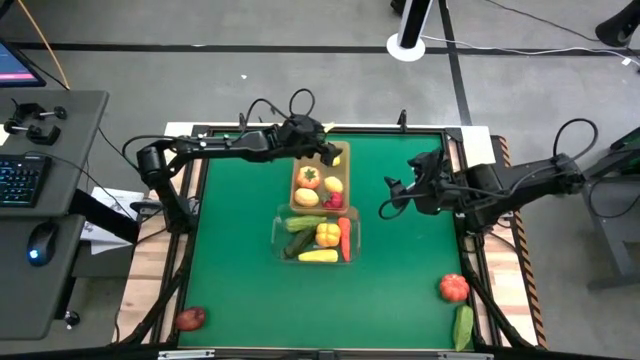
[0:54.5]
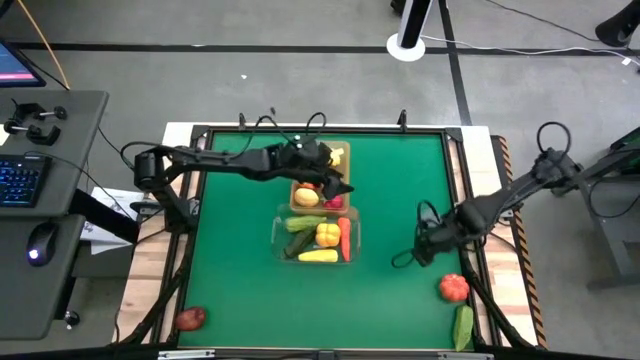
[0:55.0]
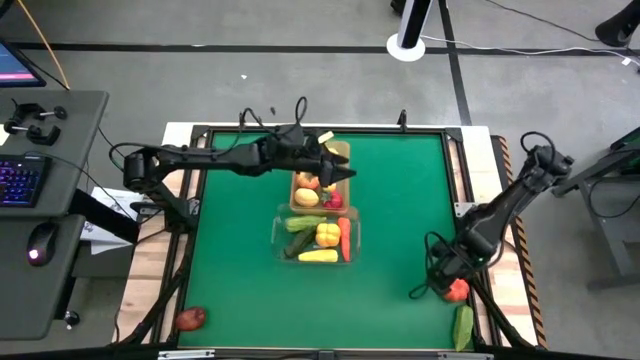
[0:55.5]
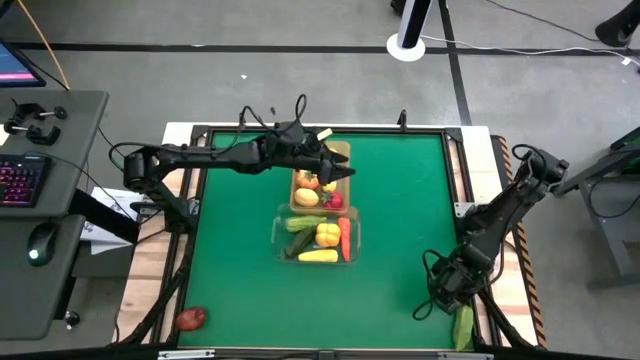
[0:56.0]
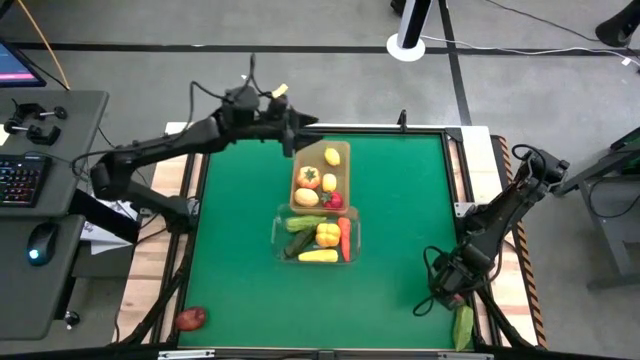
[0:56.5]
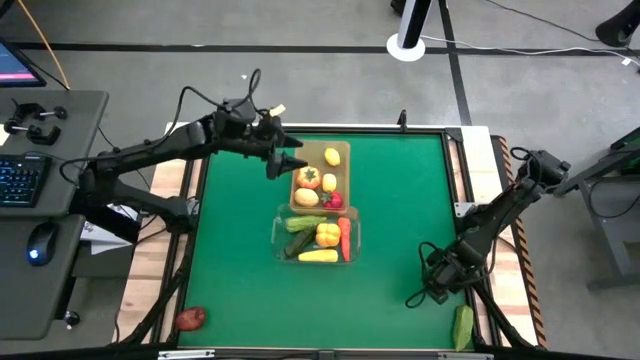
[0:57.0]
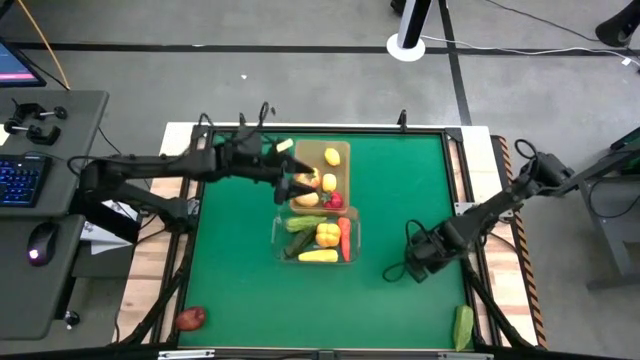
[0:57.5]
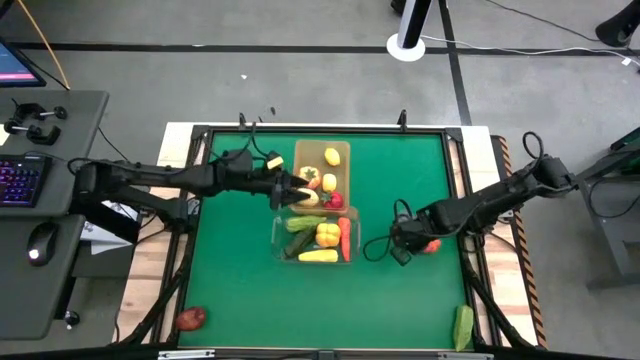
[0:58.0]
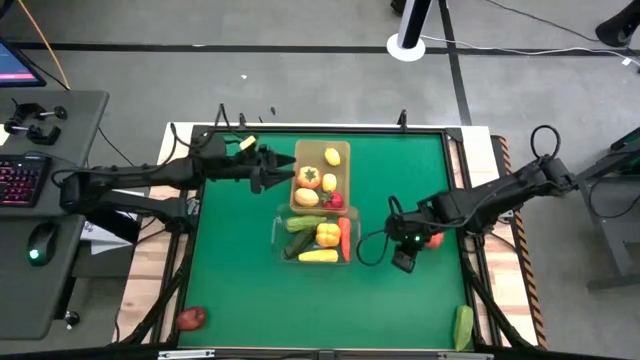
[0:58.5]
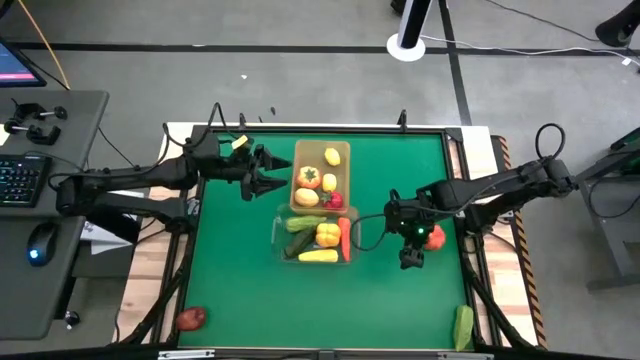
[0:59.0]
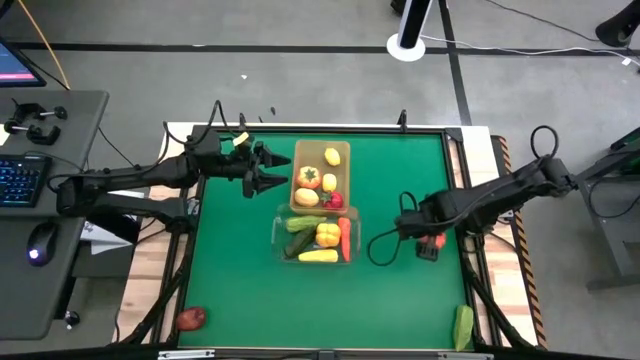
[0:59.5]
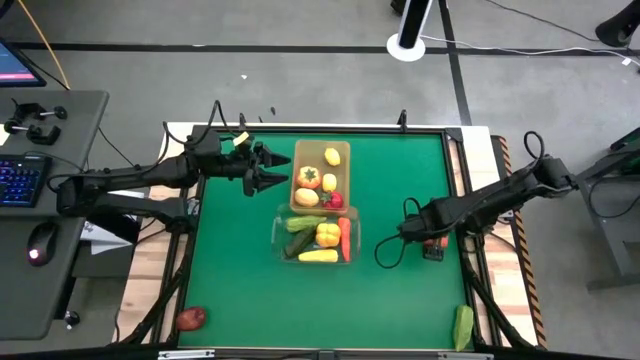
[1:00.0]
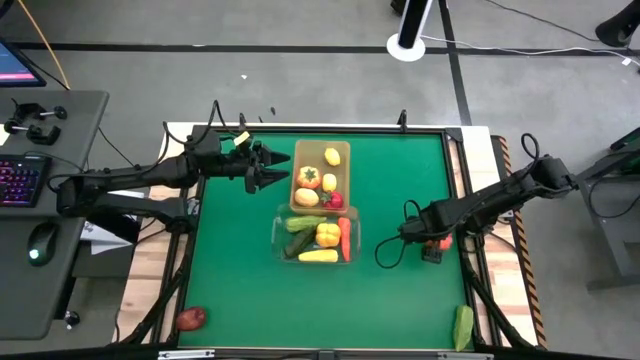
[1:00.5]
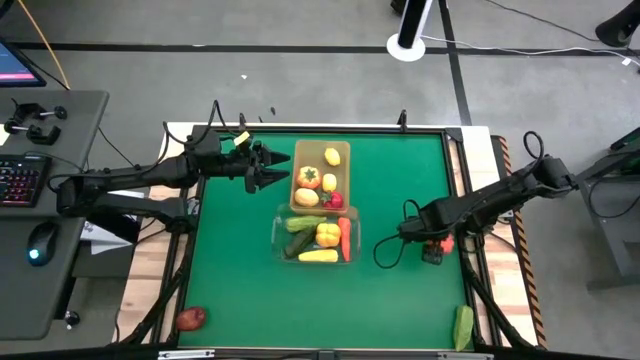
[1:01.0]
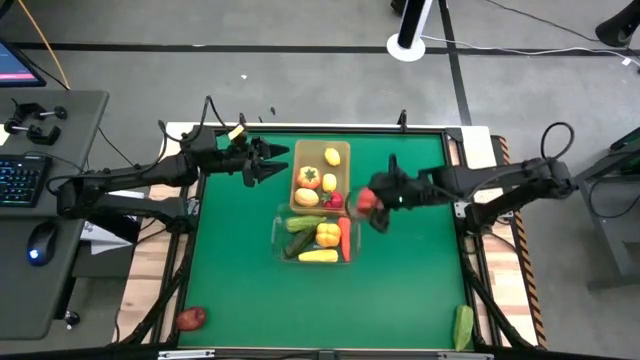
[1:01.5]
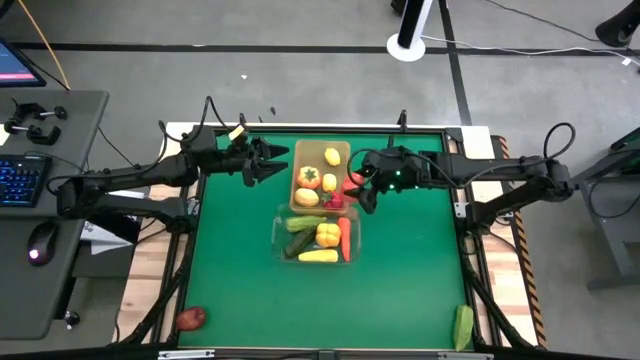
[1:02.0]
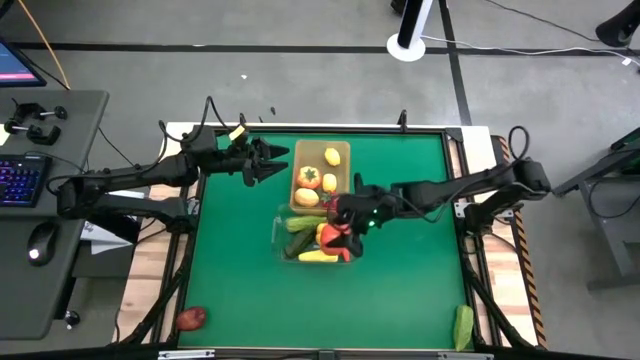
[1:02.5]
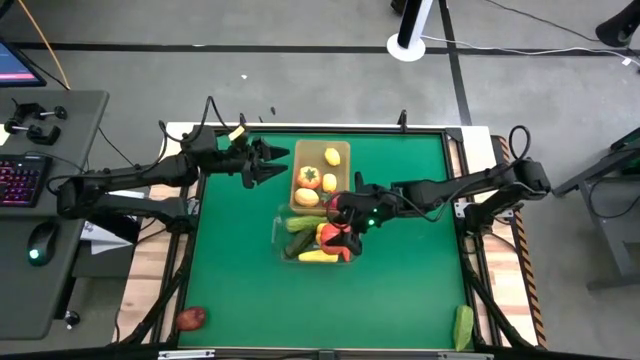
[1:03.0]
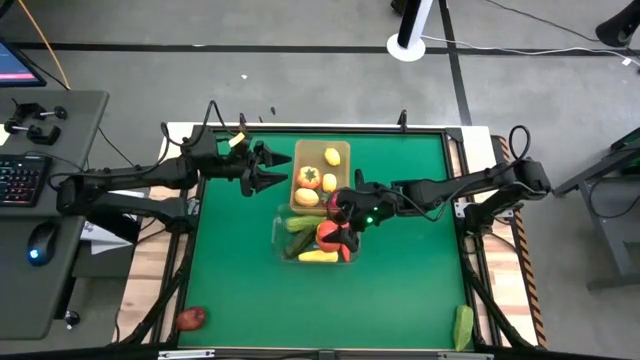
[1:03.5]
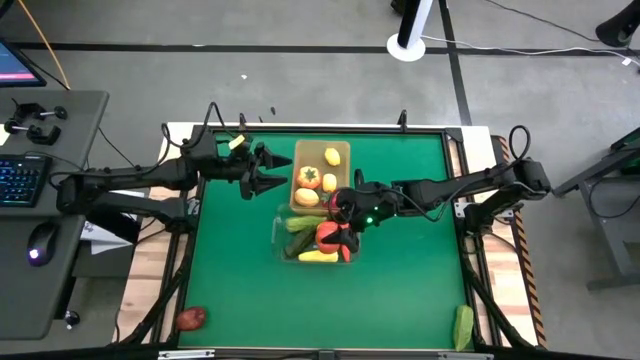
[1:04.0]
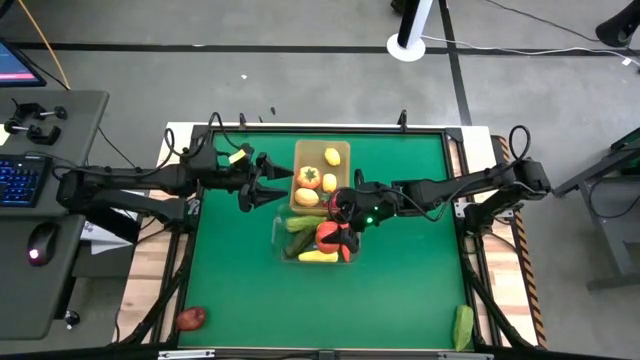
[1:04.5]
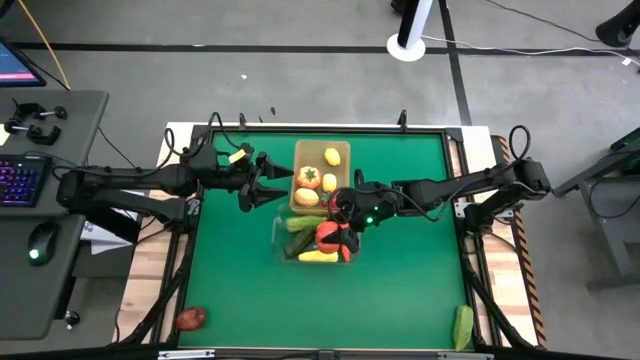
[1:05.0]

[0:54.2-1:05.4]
Task: Sort produce into baskets
Put the orange pumpkin into the transparent bin

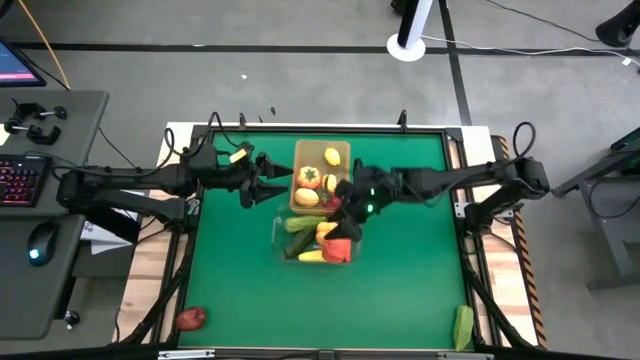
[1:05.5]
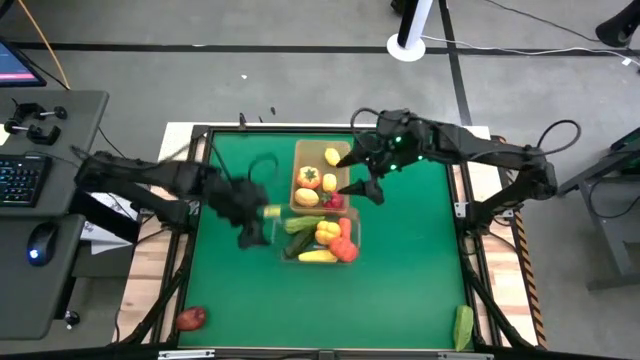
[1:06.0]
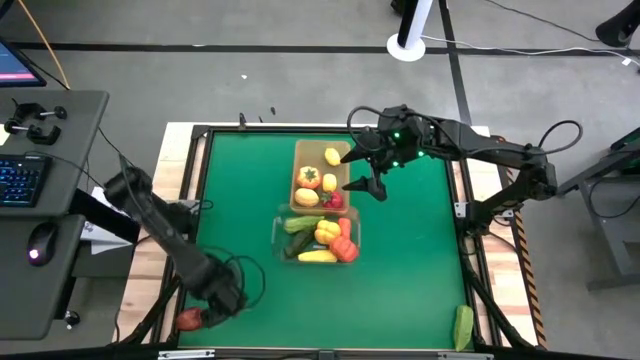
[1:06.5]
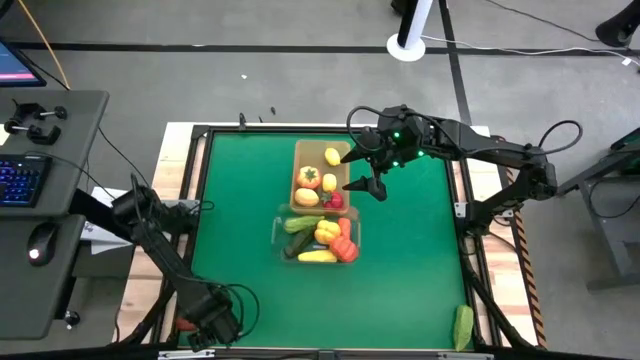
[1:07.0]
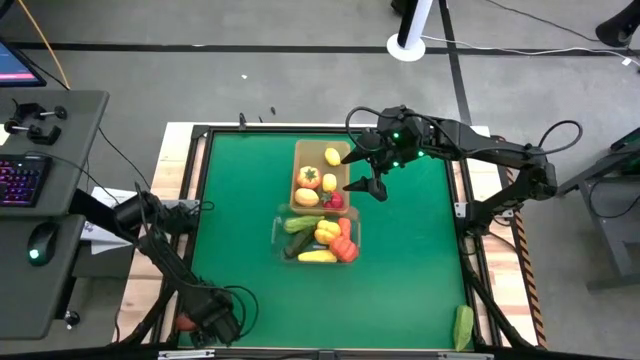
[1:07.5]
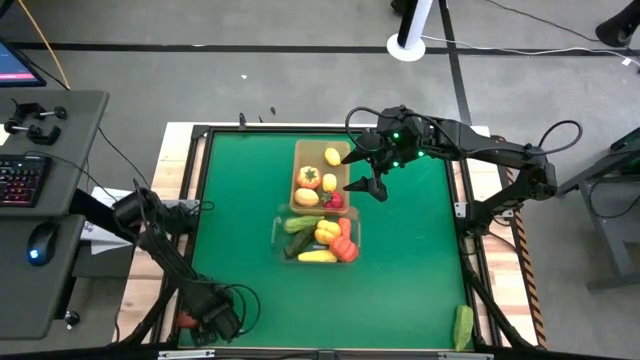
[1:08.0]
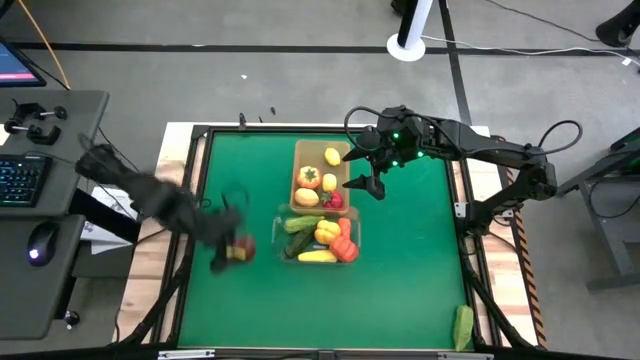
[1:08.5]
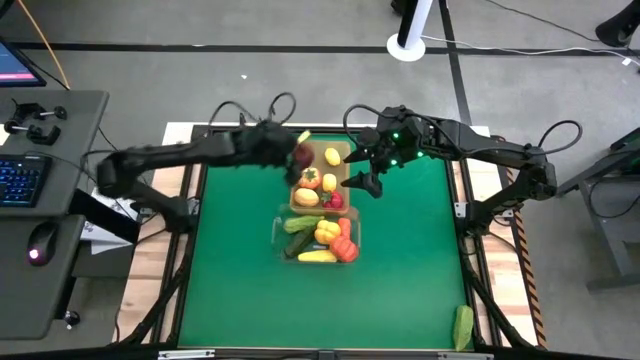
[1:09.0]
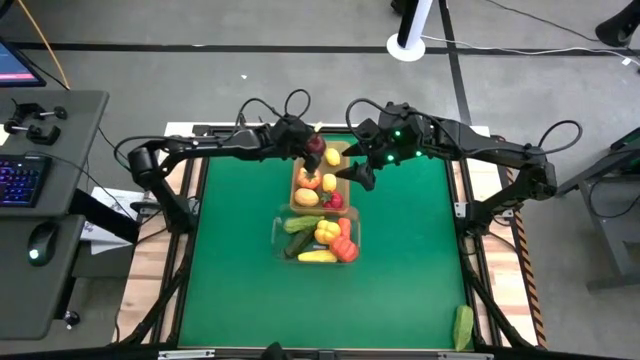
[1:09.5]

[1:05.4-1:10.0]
Put the red apple into the orange bin

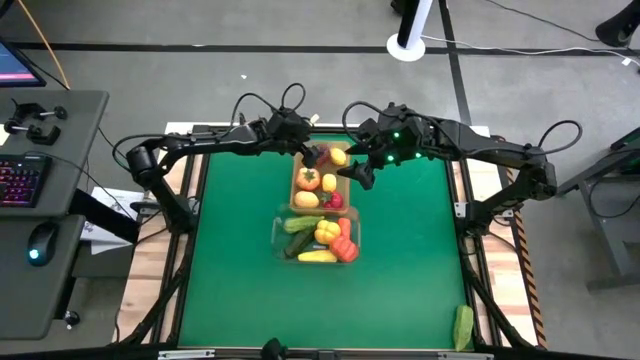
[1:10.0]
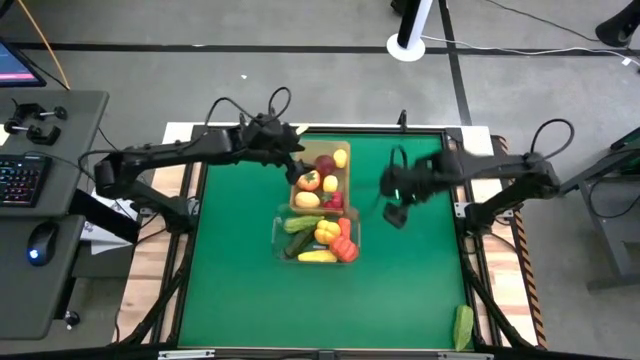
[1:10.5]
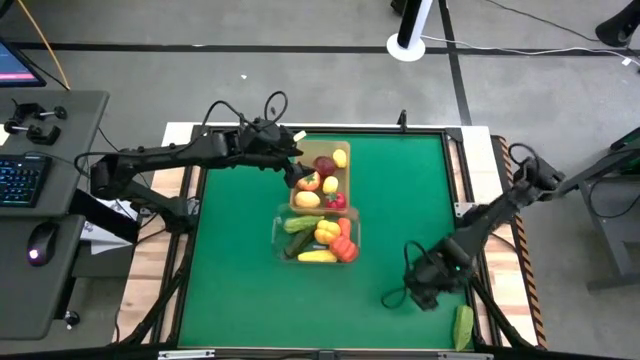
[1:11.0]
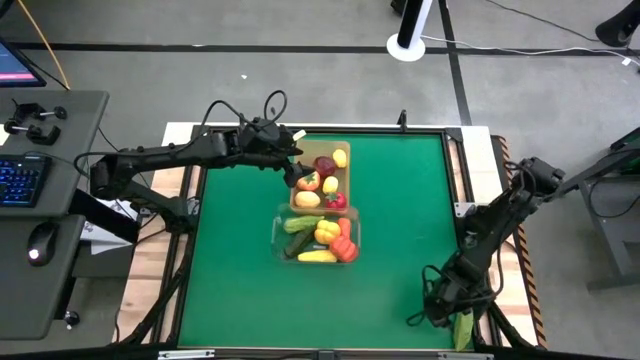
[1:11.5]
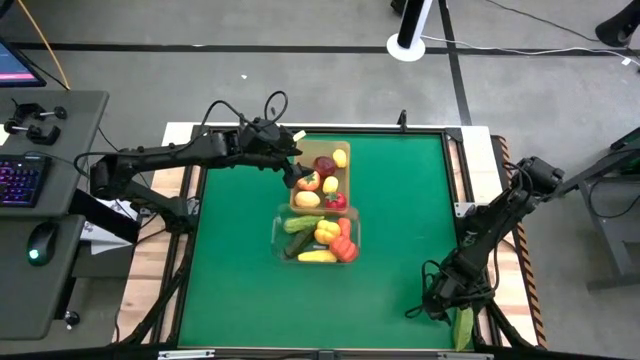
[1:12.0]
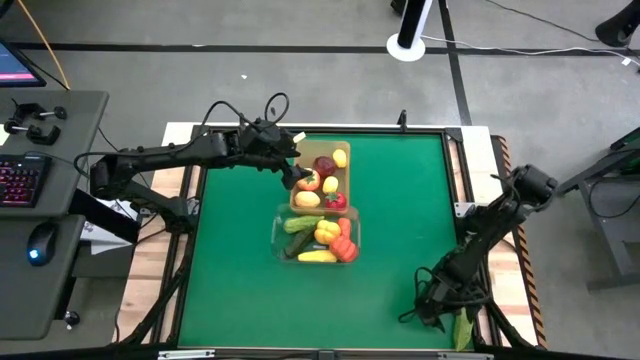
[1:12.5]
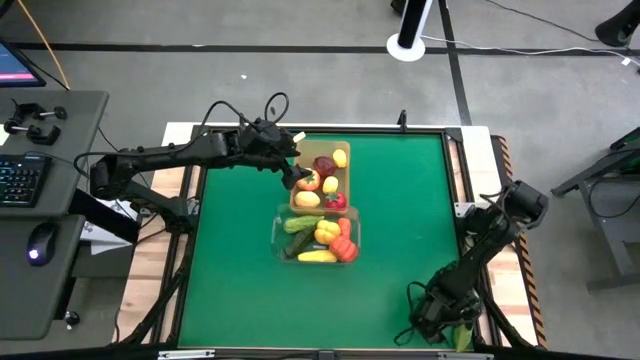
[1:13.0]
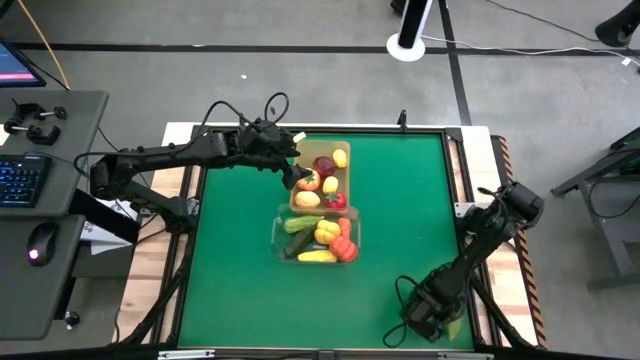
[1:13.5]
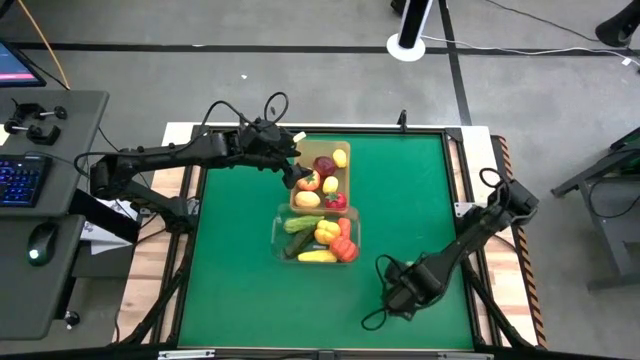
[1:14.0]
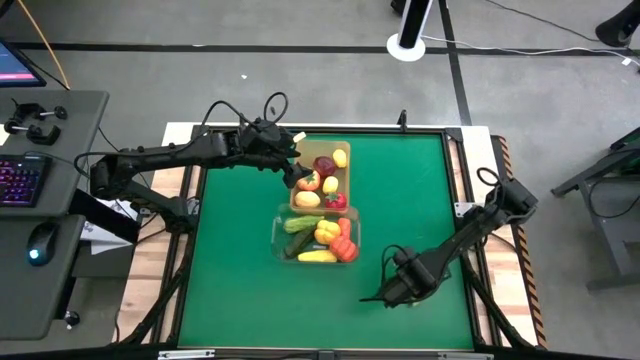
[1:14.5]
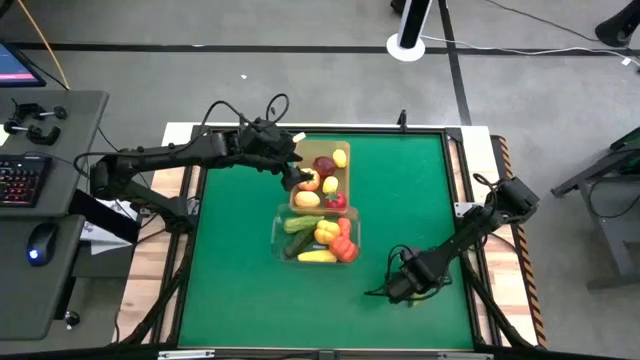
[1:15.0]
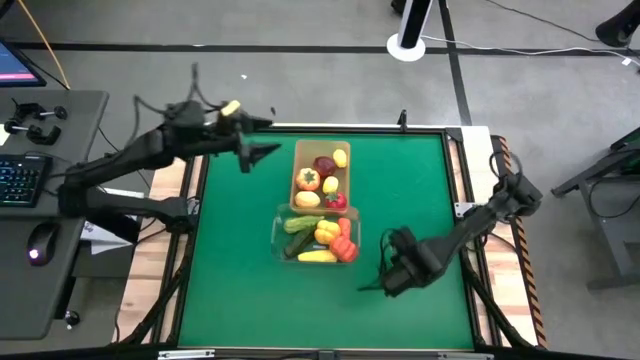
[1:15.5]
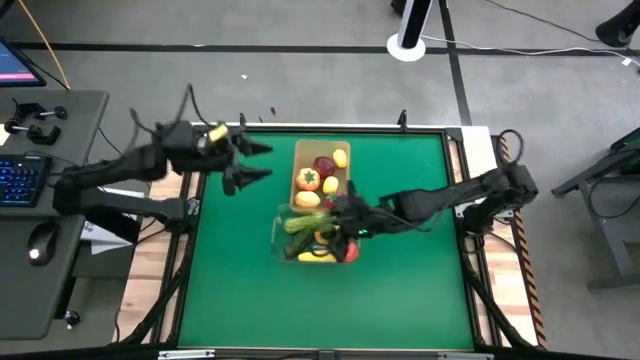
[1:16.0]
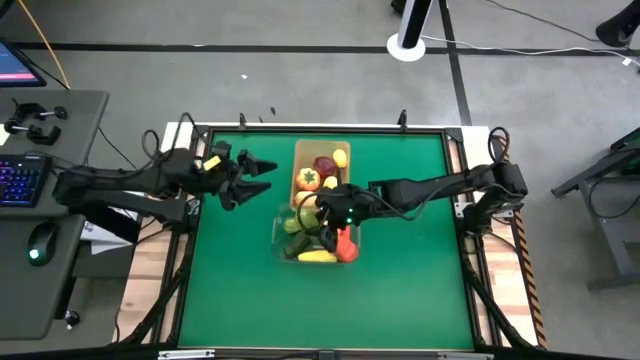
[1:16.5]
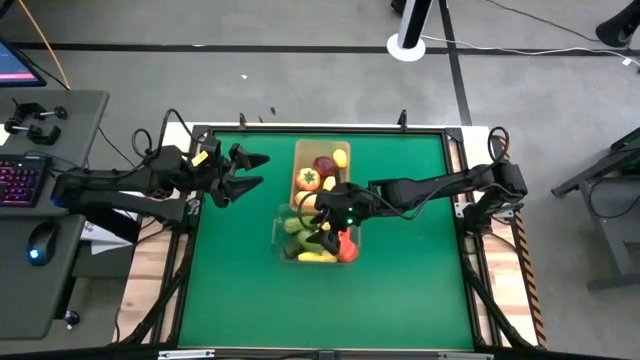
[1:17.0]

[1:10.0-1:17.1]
Put the green cucumber into the transparent bin
